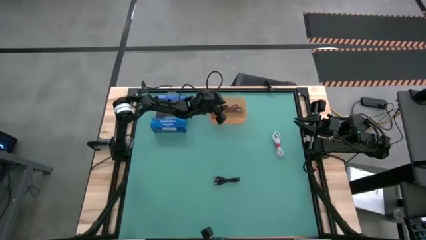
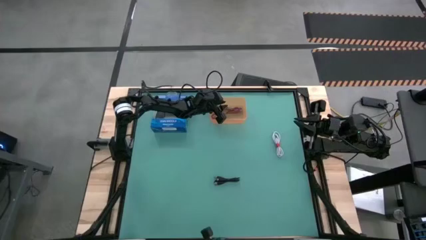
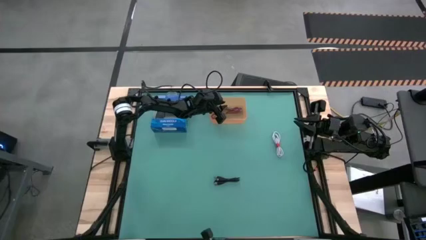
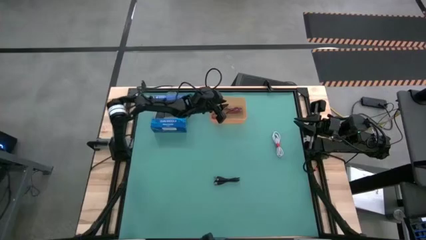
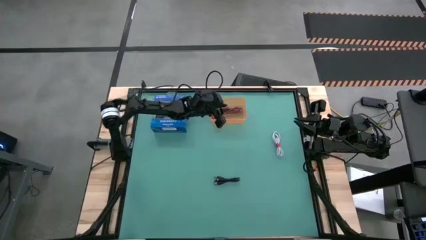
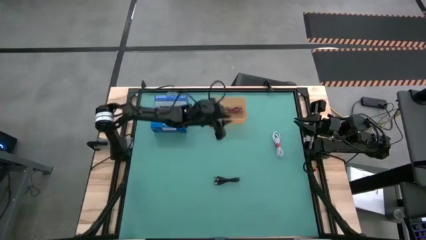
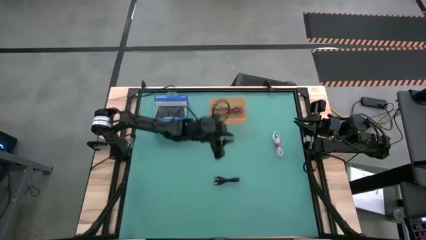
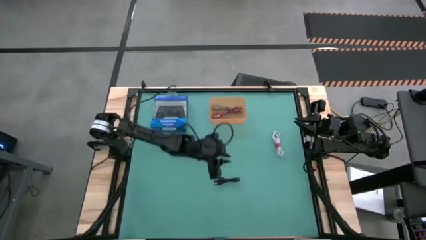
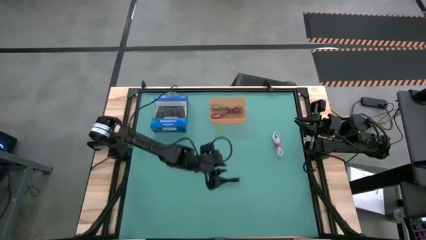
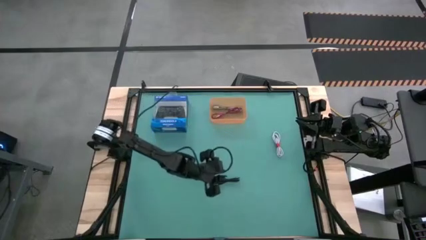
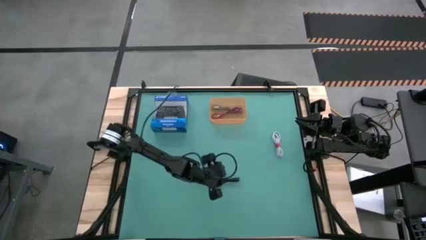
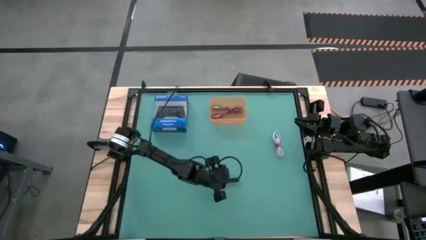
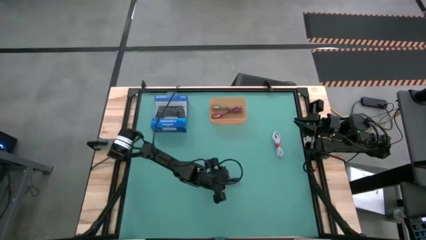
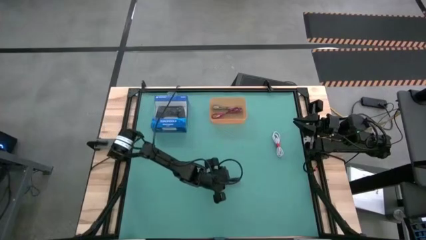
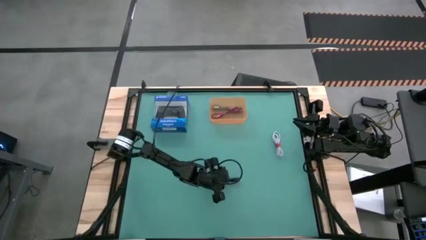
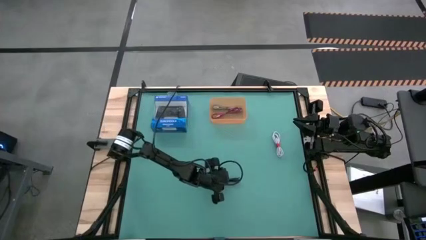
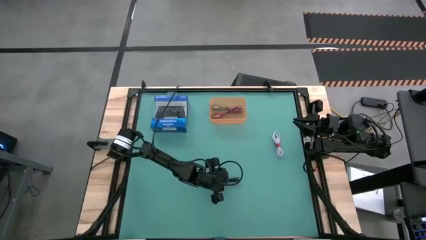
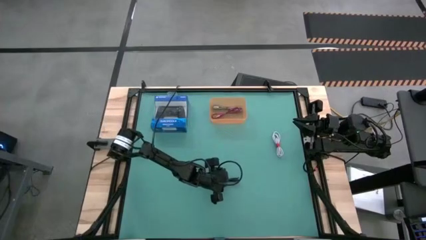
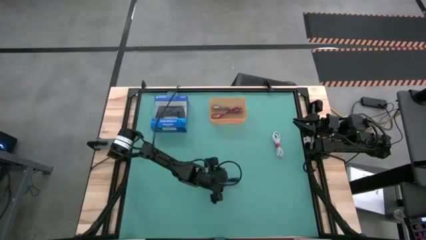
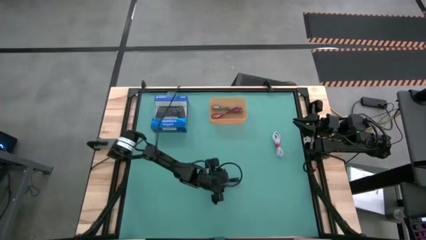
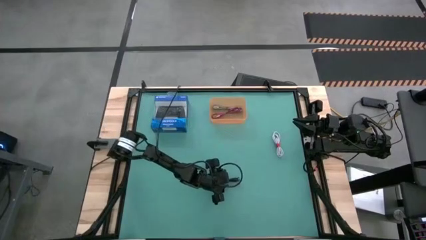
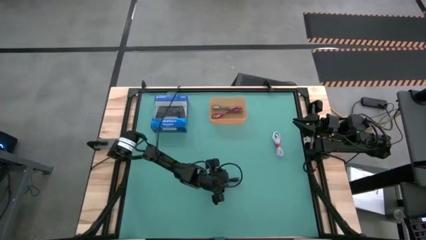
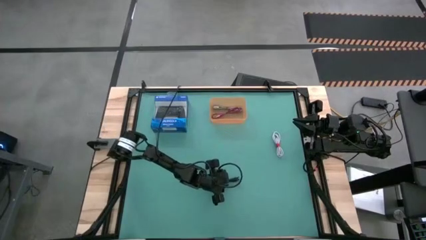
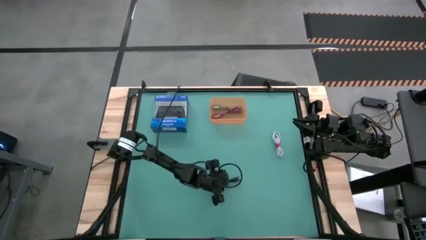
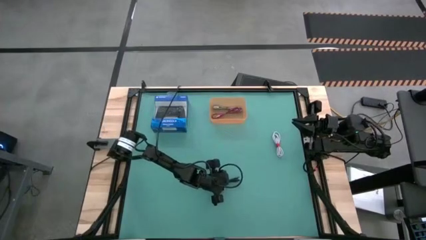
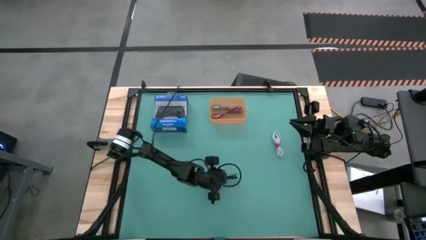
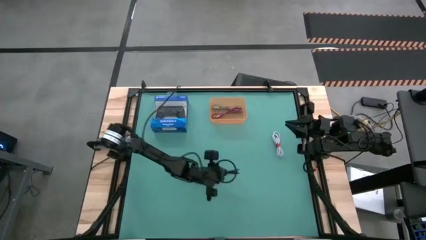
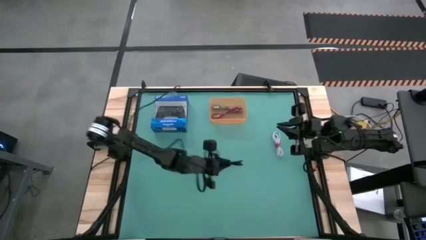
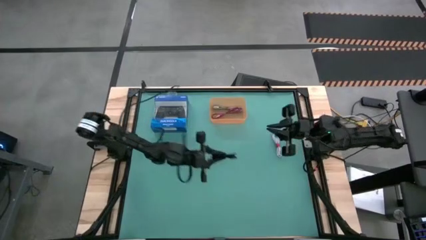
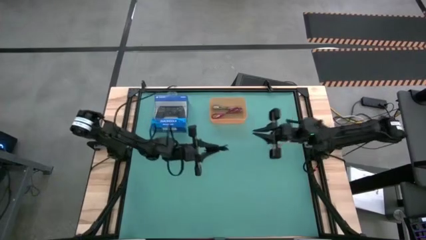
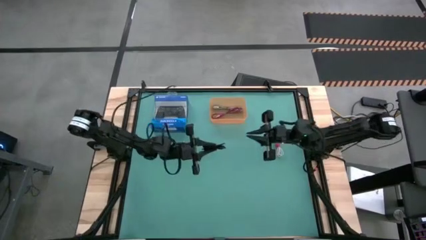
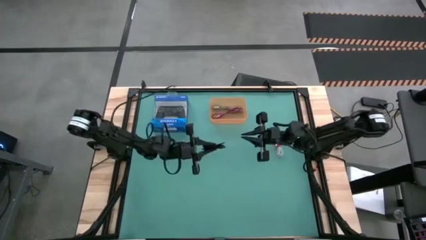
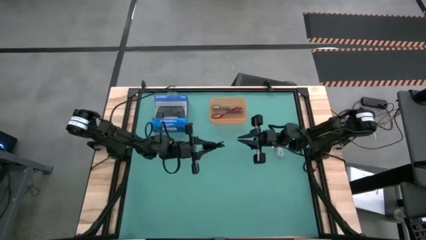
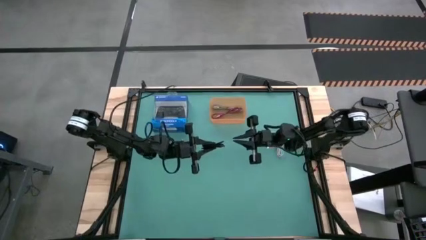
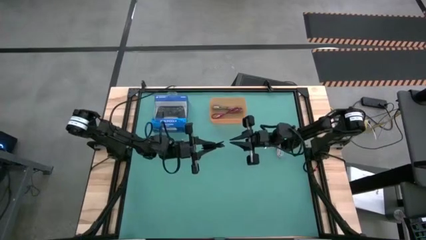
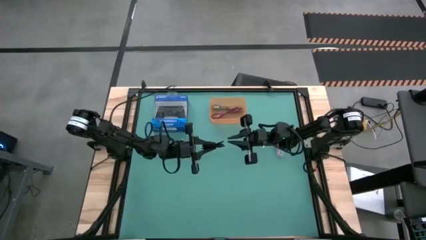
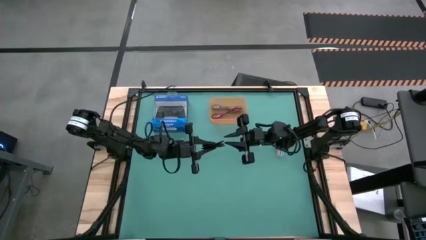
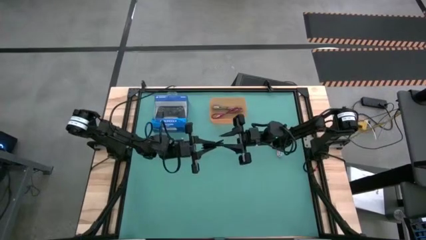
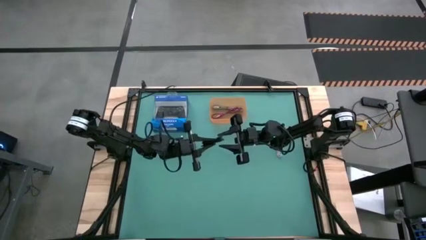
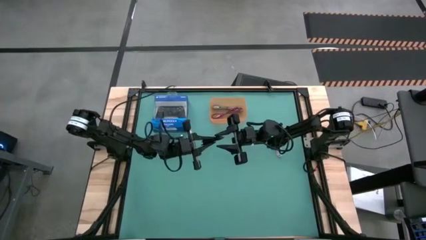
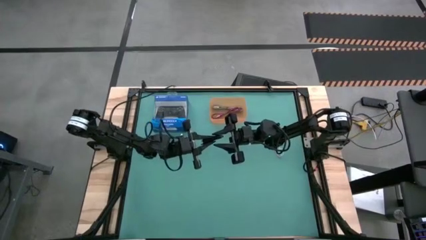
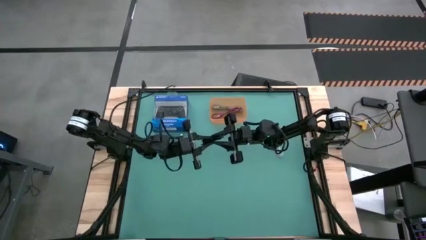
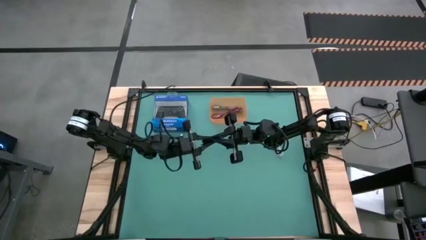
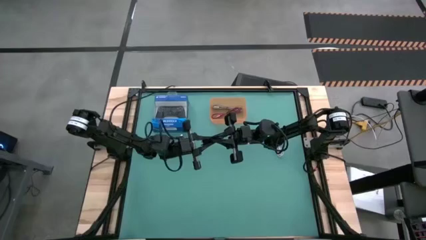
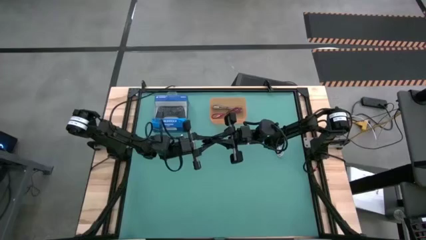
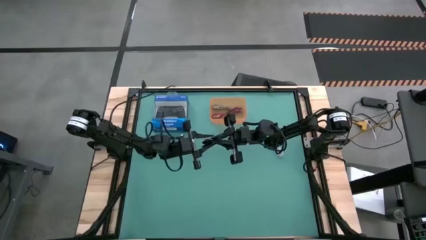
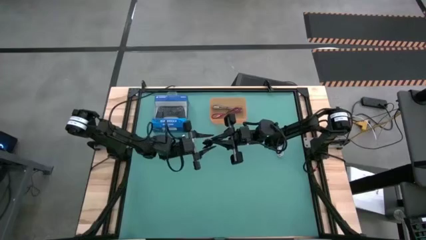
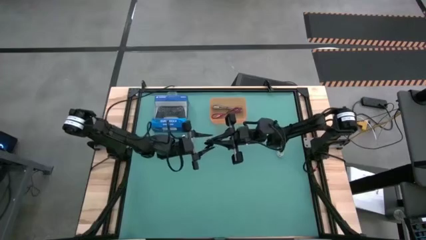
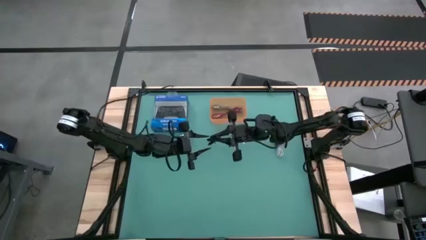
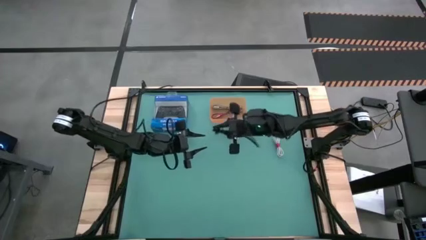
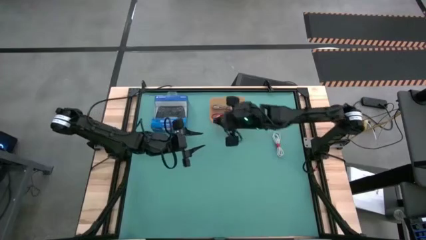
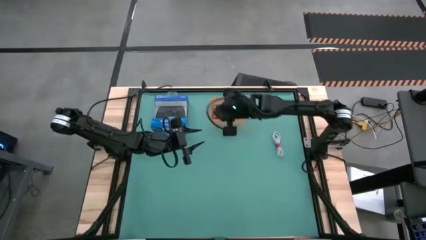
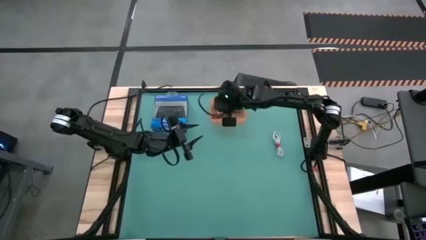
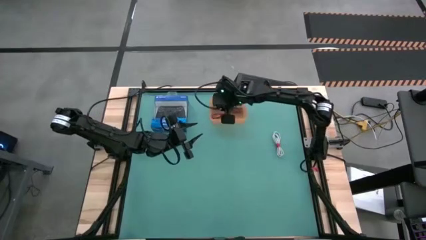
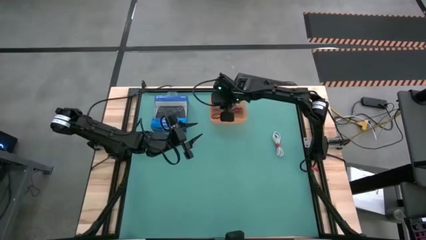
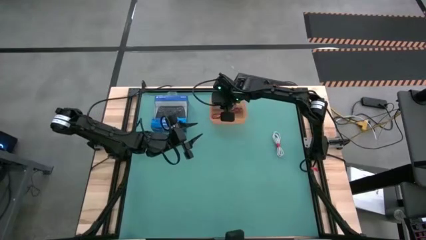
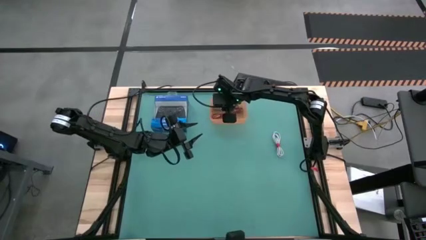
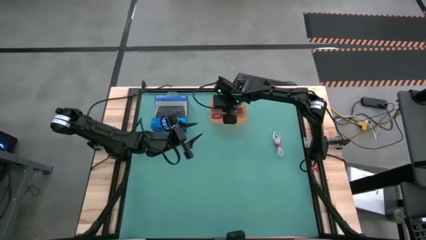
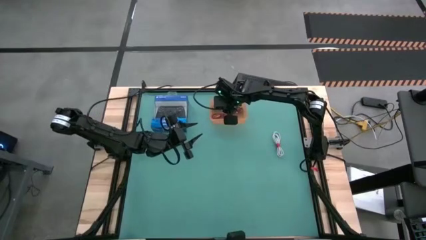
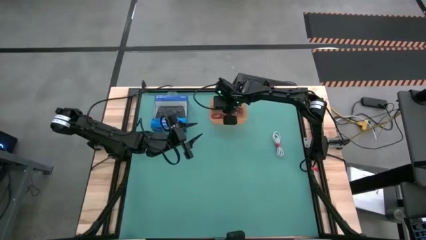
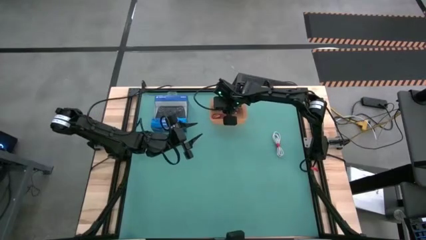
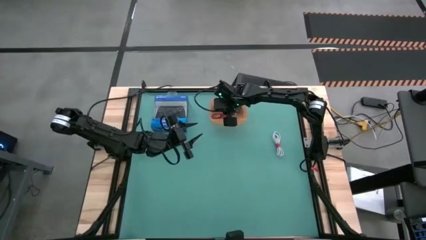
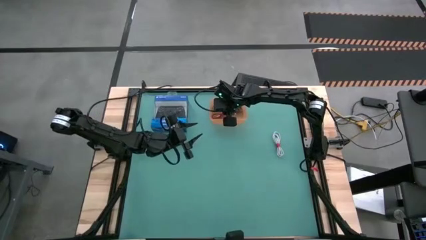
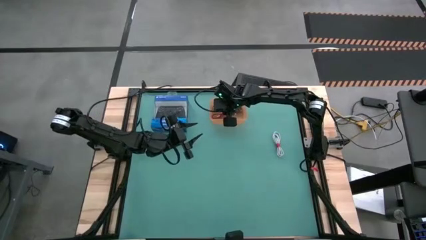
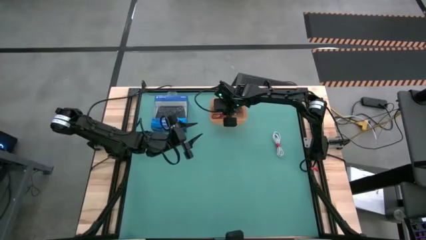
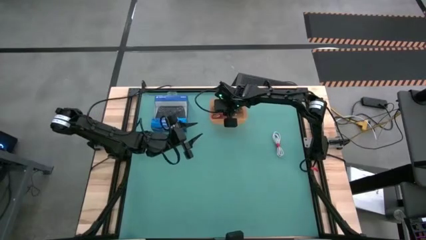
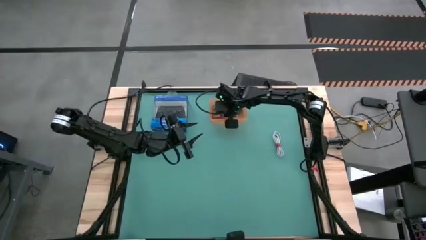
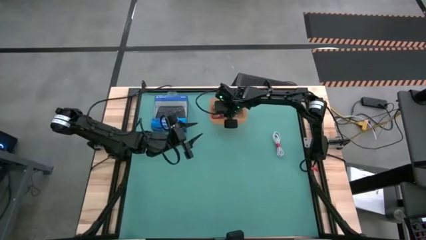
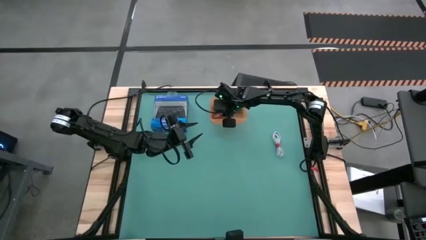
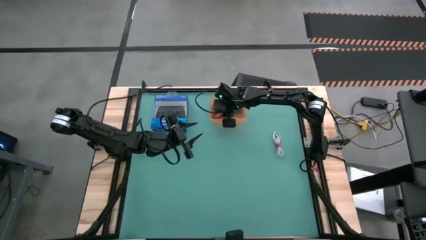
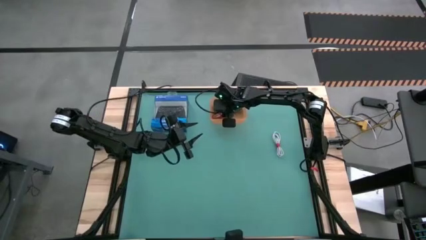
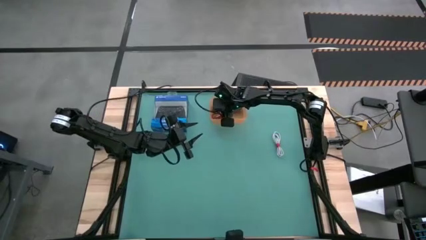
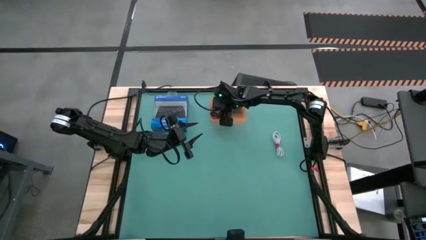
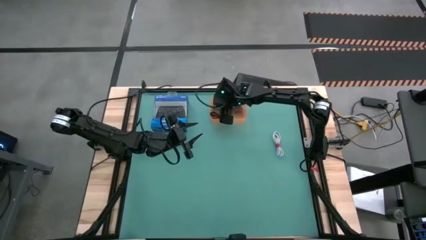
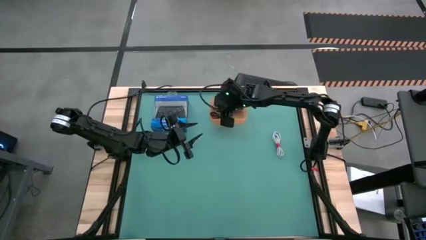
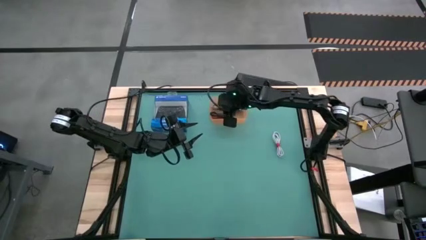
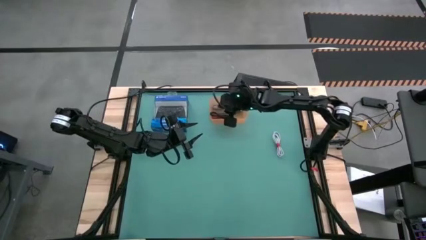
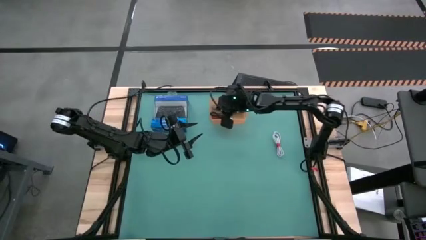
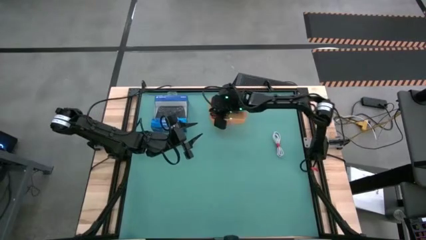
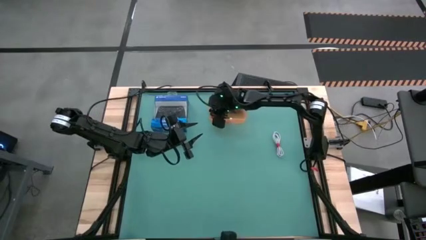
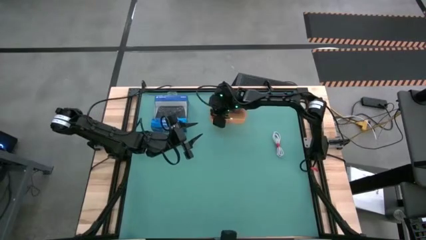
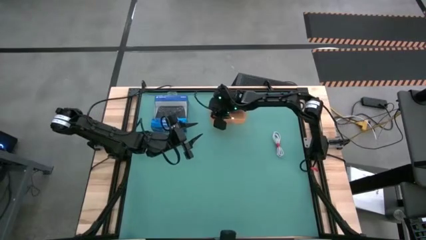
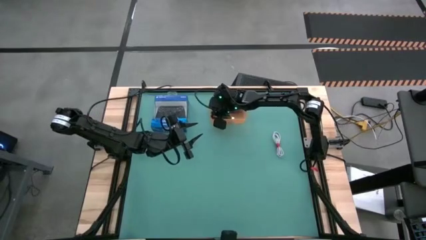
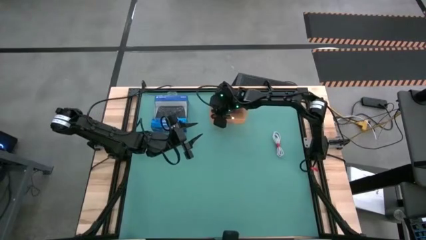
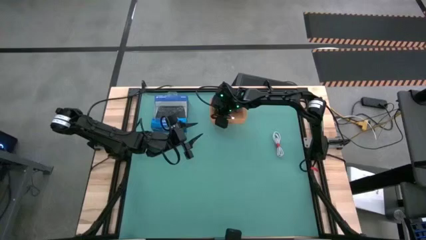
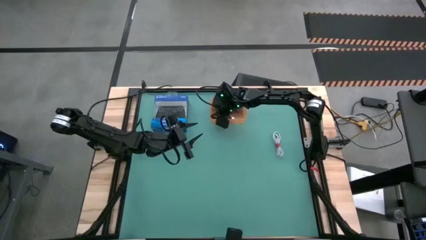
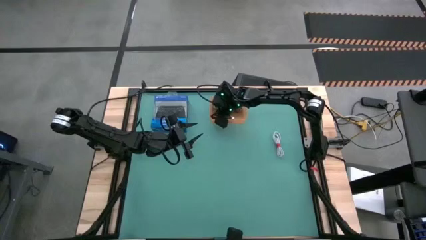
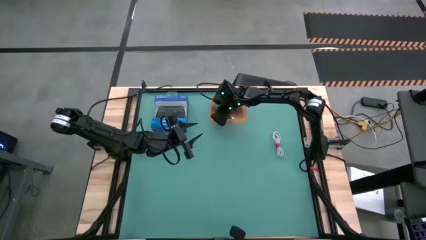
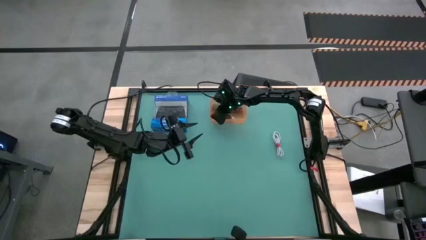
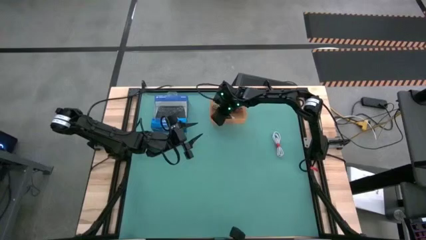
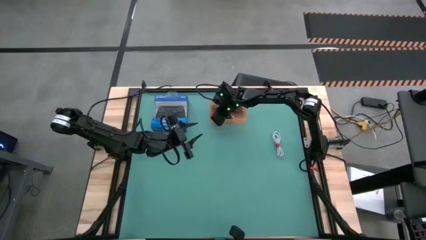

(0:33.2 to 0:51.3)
Task: Pick and place USB-C Cables
Put the black charger cable into the orange bin
